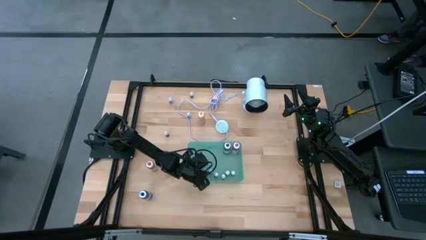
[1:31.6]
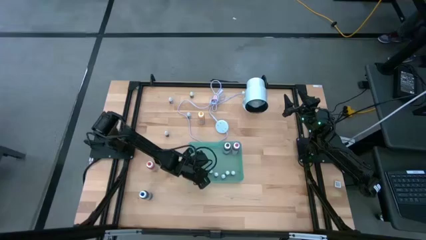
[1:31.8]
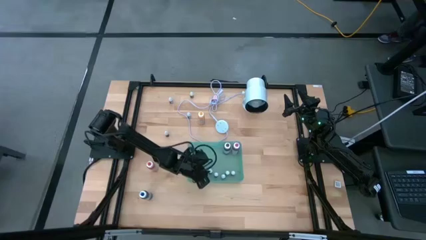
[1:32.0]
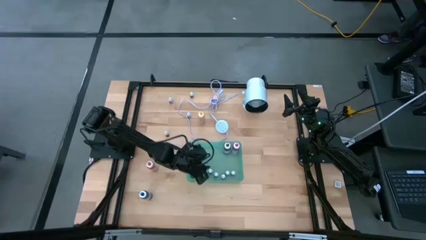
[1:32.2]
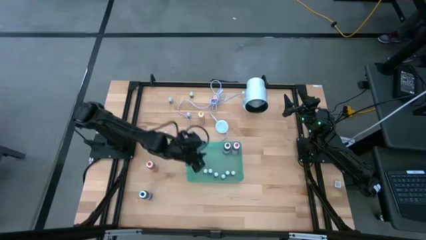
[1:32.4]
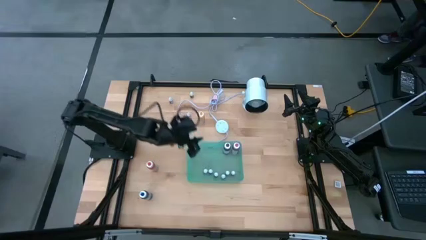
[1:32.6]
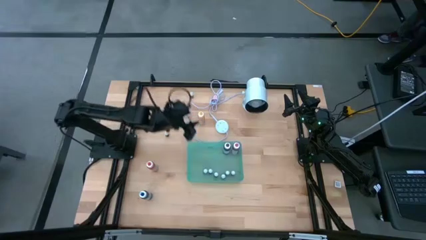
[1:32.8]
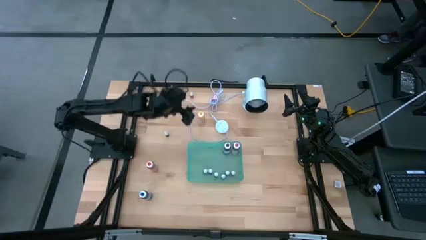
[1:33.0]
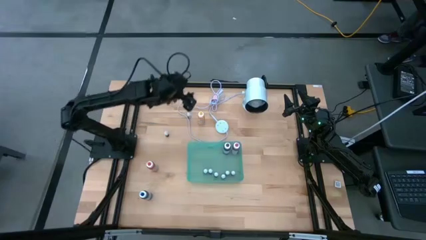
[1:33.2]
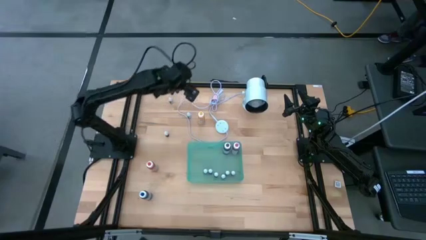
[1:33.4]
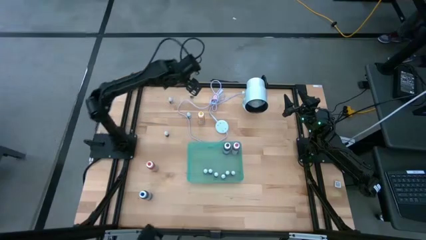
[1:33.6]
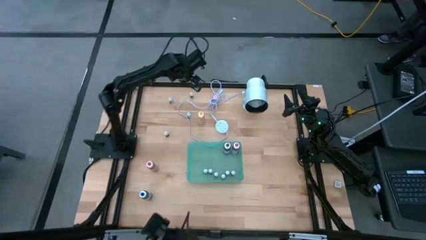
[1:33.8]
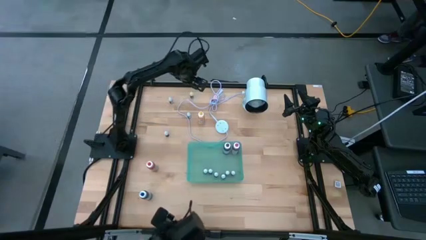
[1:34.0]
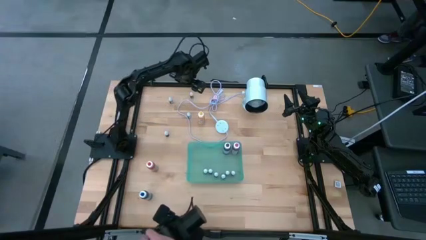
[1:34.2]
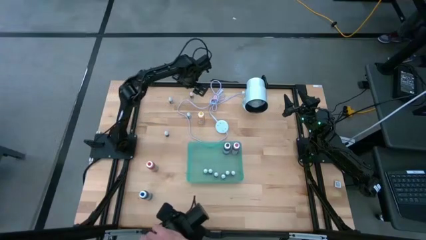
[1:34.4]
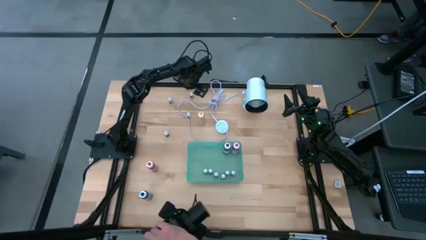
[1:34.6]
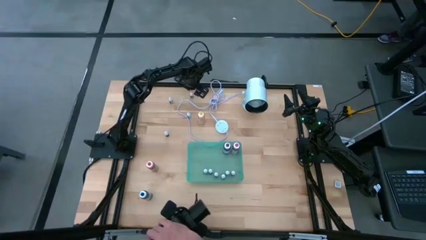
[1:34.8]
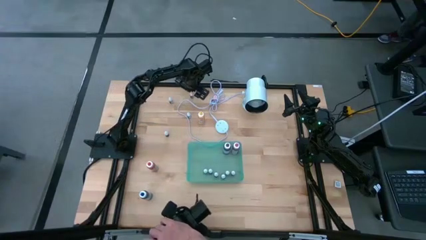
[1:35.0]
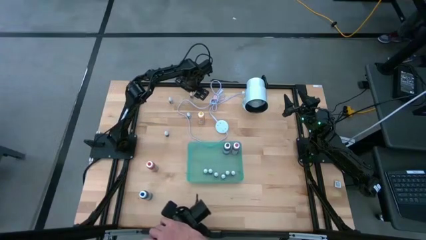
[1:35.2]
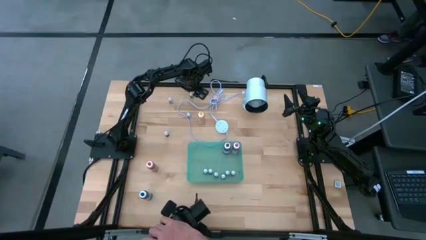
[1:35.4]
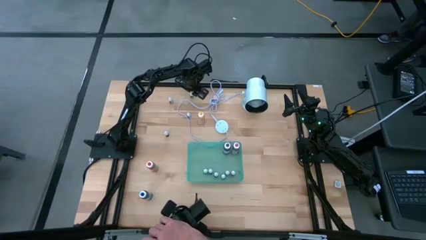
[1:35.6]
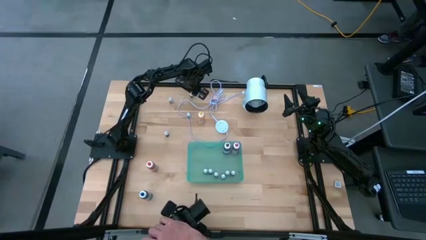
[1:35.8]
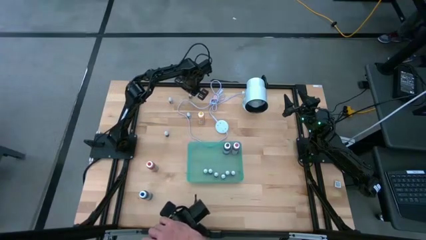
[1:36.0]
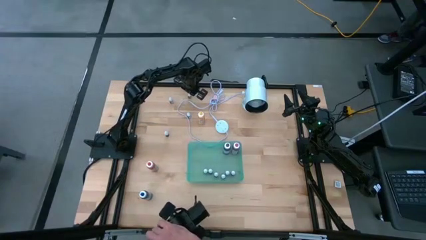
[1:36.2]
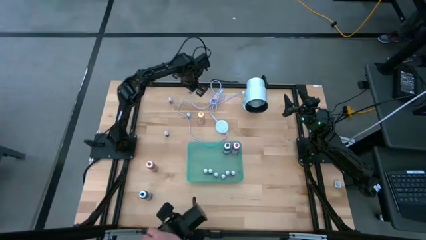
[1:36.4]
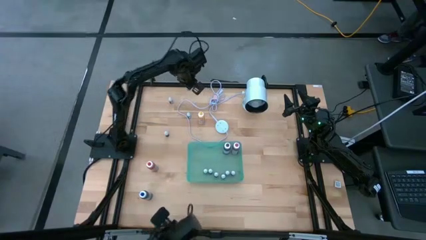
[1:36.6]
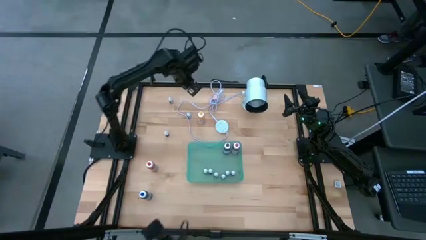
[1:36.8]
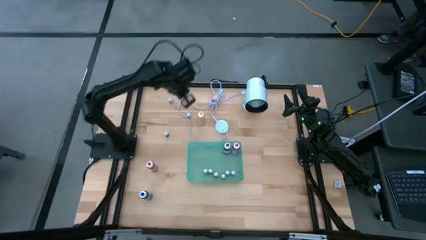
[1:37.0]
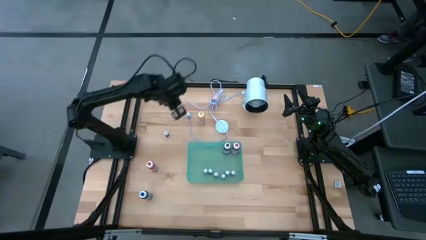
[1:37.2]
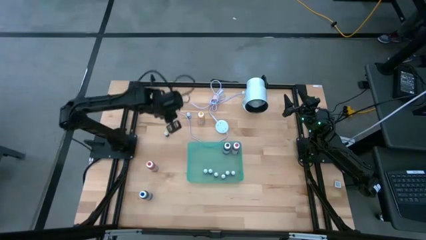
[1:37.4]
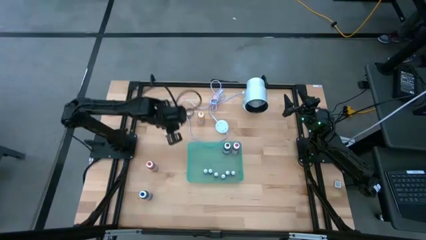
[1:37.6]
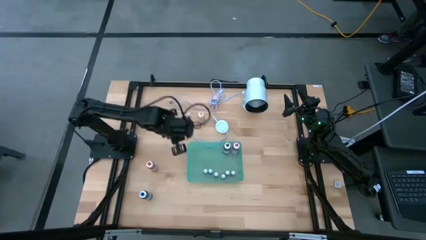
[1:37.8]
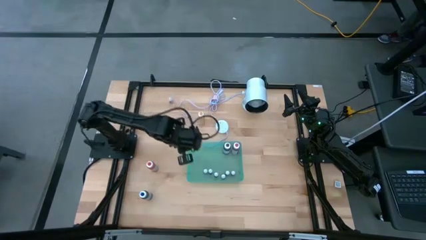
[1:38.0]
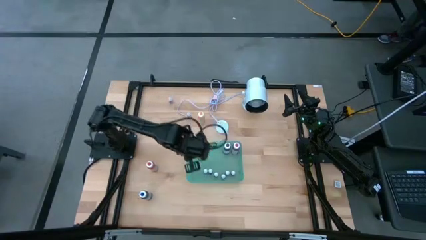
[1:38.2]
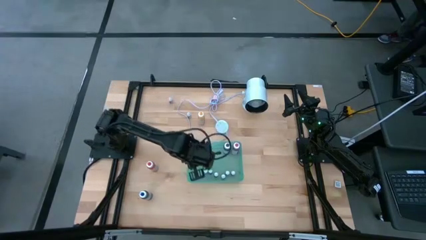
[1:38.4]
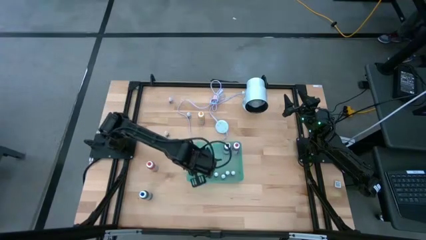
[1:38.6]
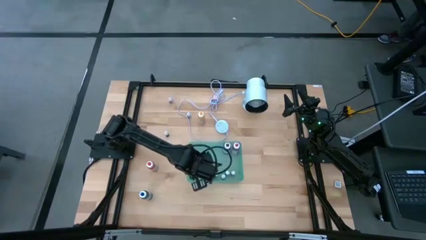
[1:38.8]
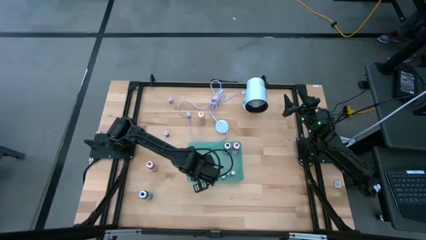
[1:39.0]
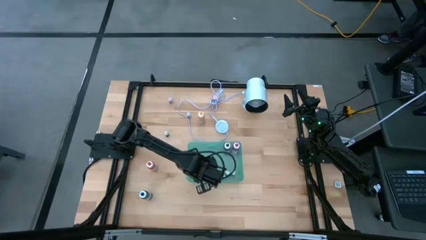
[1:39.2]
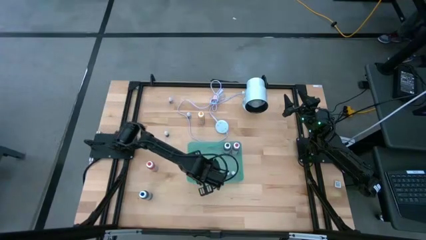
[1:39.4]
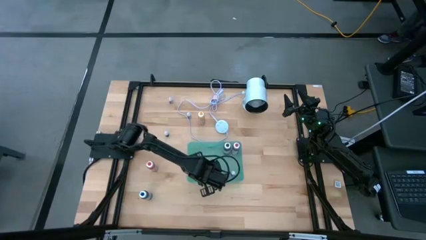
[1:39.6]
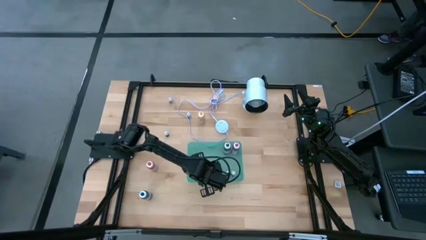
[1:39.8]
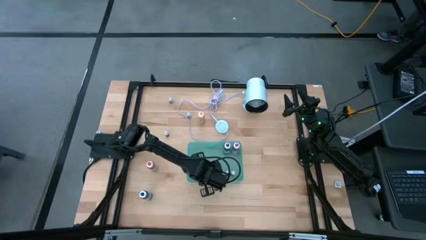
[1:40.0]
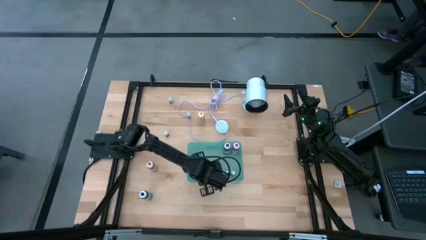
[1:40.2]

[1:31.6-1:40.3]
Task: Pick & Place food coloring
Put the top small green food coloring bottle into the bin

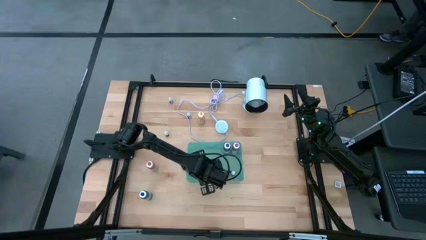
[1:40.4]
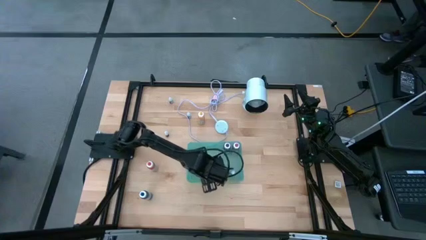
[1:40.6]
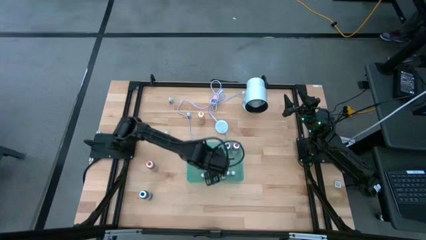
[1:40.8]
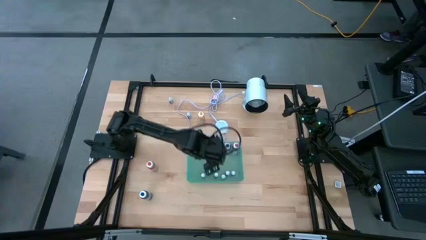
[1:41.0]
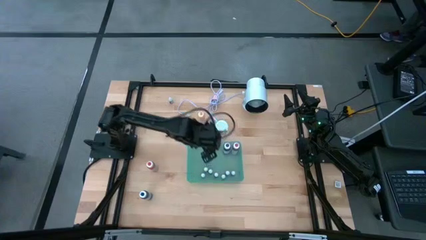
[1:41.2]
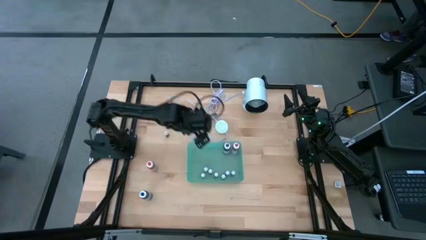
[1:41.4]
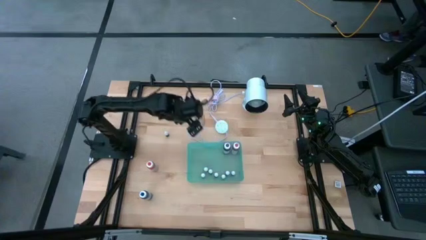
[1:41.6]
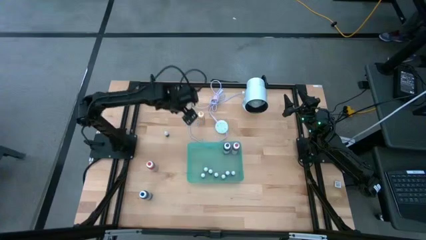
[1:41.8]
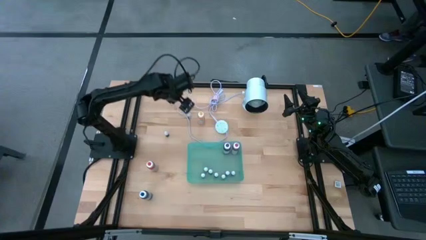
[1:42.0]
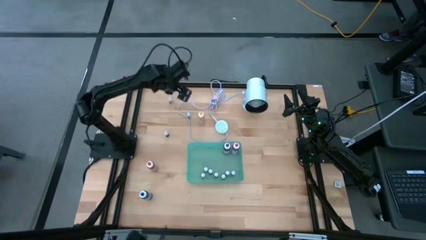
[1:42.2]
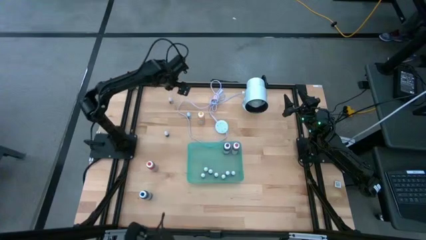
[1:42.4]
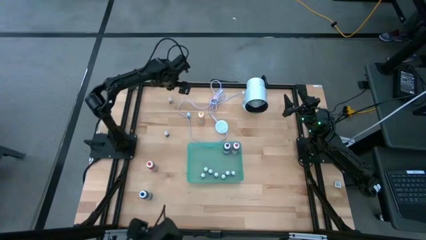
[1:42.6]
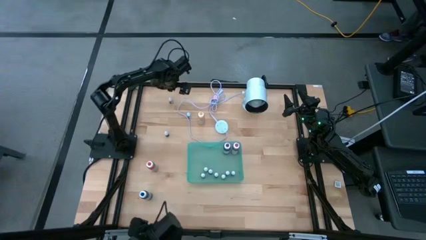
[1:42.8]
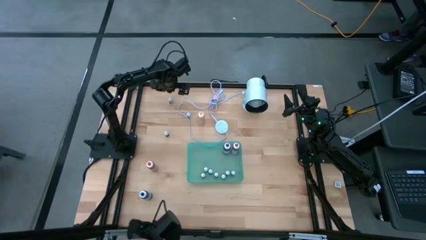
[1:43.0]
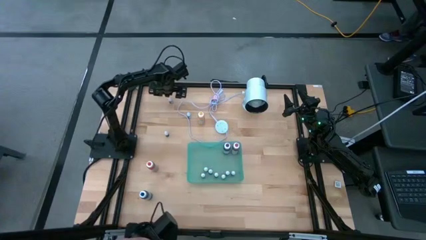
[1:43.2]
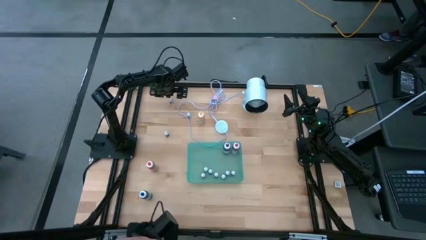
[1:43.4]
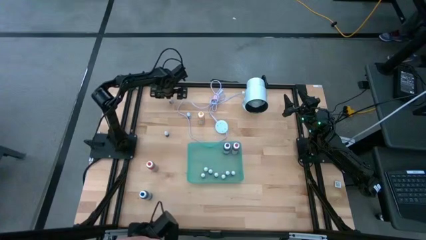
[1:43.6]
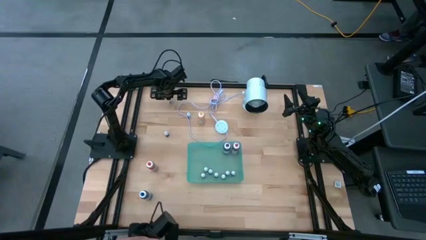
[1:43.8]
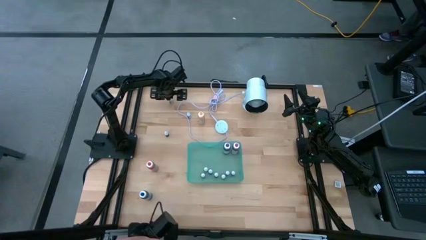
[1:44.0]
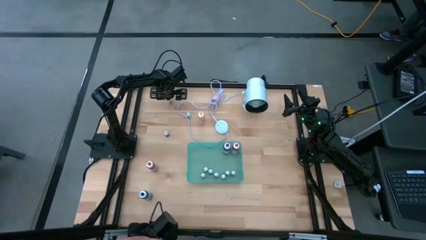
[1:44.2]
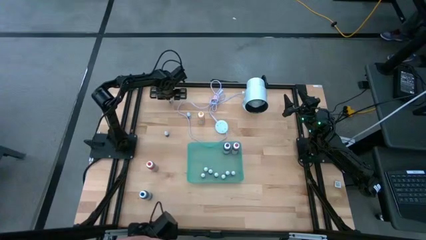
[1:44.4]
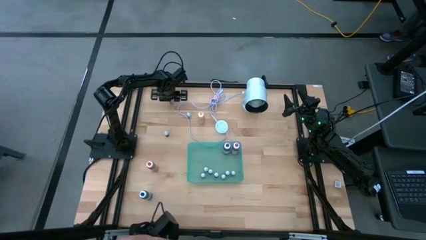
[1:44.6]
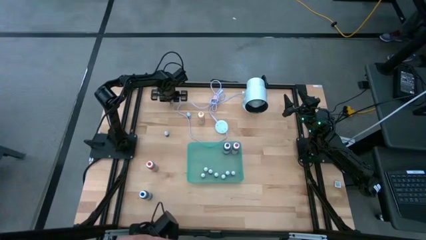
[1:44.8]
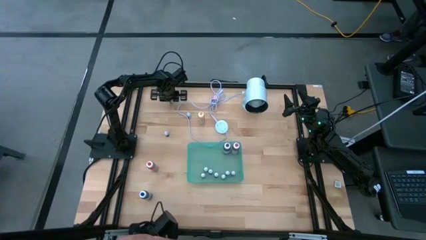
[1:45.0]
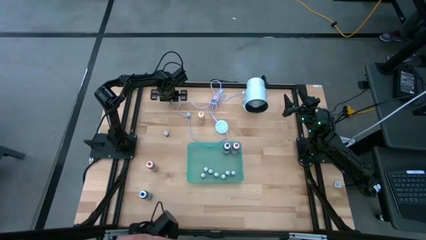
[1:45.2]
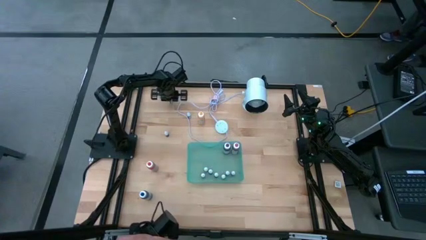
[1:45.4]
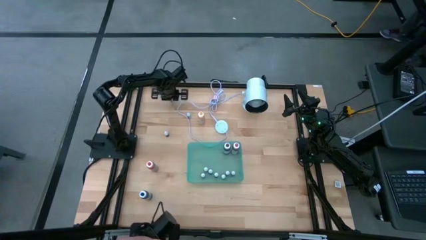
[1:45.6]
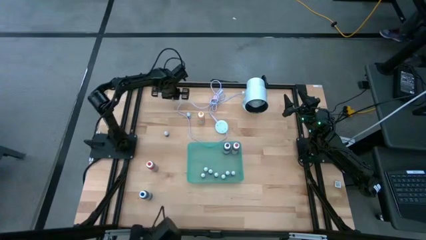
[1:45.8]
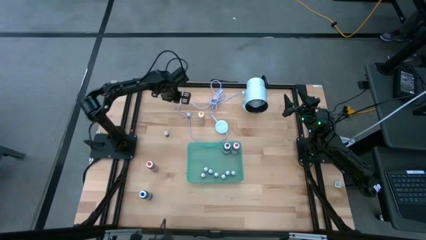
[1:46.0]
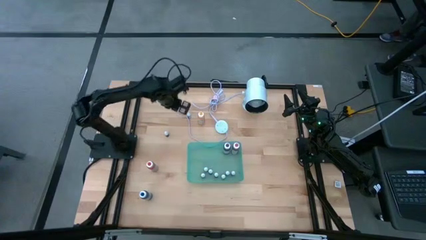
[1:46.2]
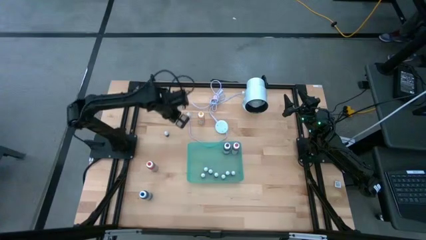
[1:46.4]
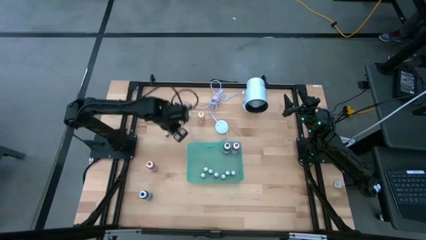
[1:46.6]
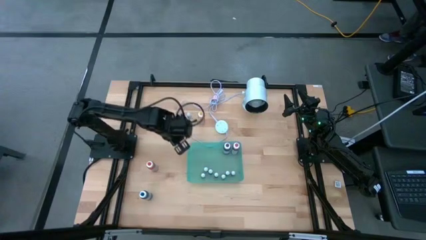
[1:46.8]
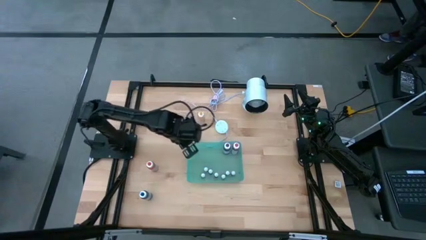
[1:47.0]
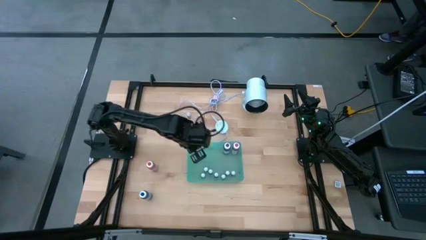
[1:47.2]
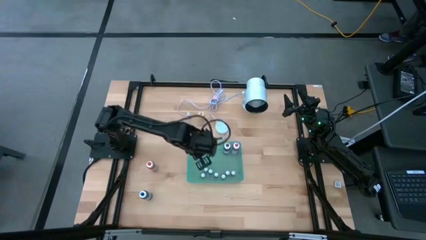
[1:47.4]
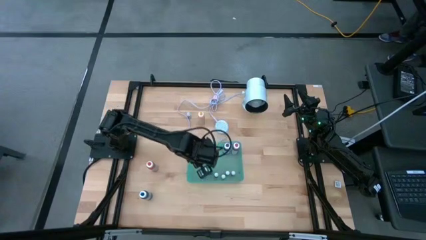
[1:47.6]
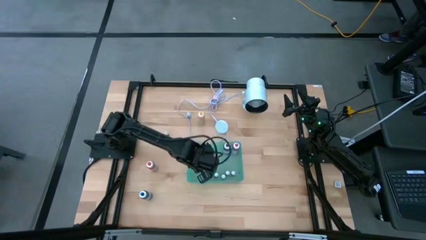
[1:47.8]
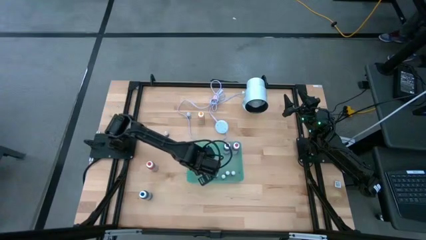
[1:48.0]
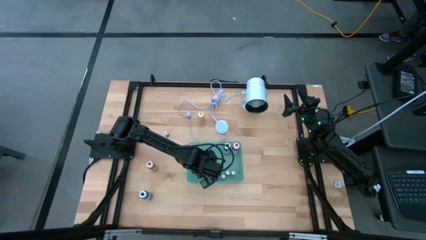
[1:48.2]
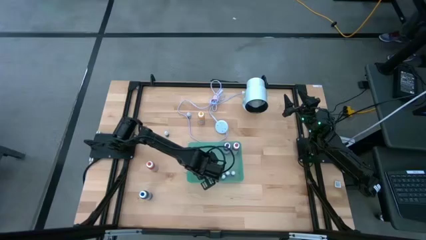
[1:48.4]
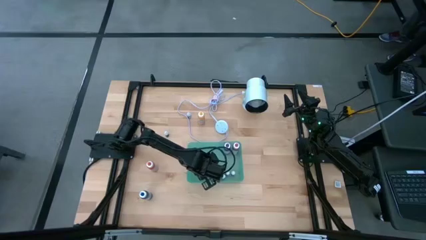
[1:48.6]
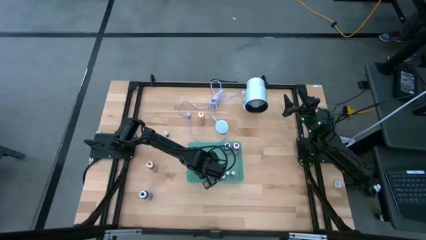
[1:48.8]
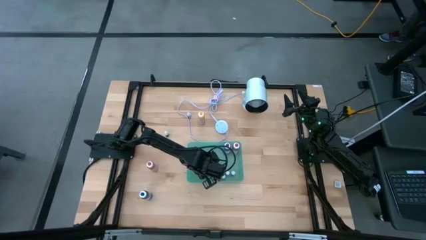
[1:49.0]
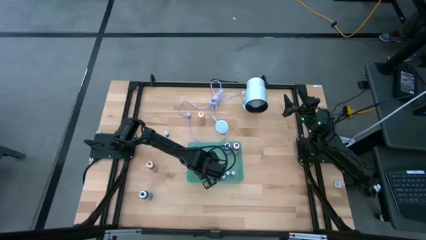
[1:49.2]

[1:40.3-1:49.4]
Put the small black food coloring bottle into the bin
